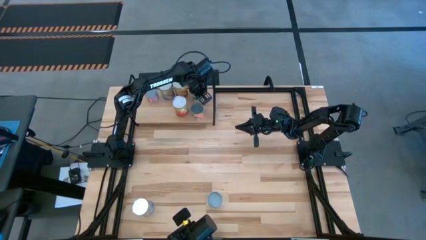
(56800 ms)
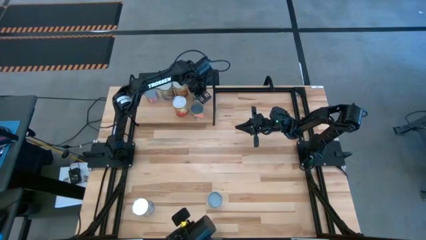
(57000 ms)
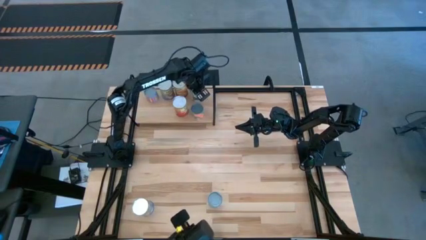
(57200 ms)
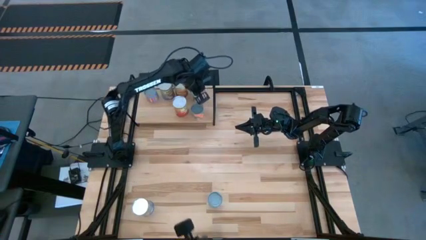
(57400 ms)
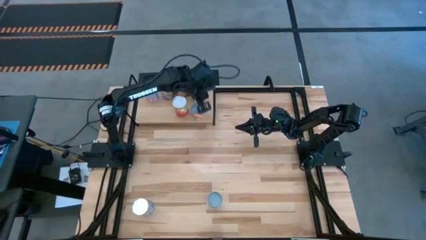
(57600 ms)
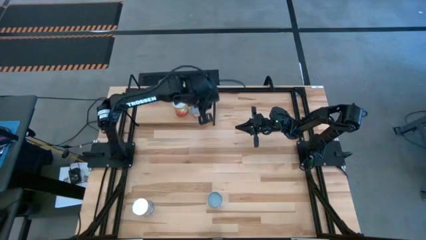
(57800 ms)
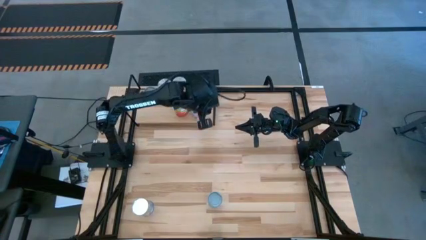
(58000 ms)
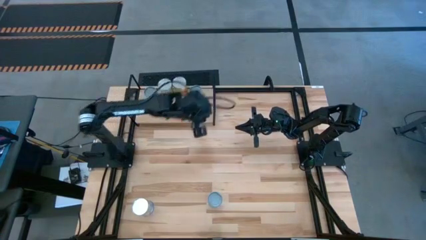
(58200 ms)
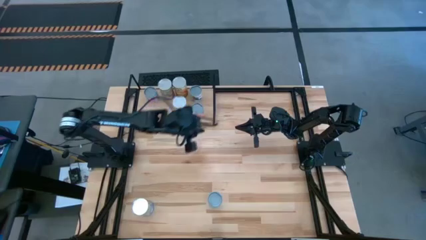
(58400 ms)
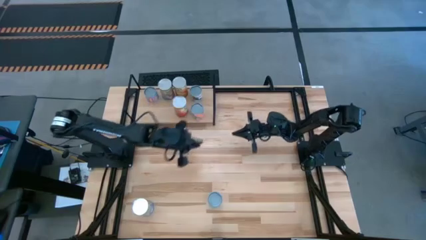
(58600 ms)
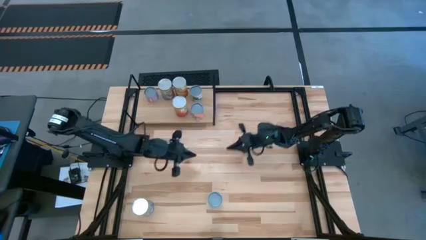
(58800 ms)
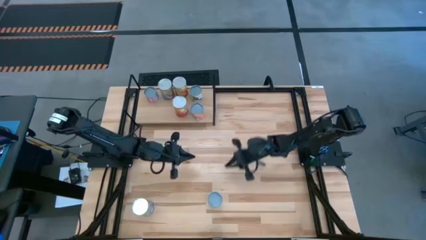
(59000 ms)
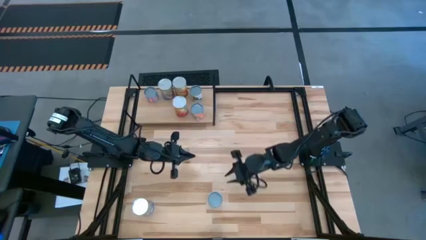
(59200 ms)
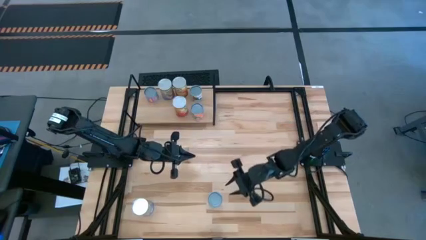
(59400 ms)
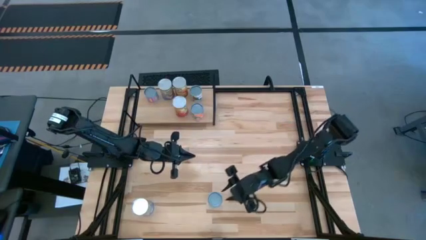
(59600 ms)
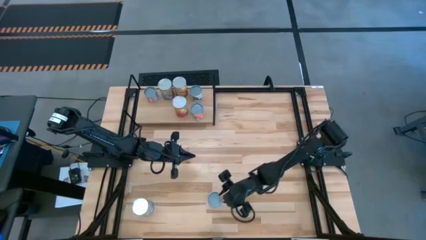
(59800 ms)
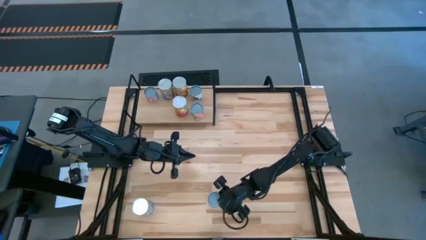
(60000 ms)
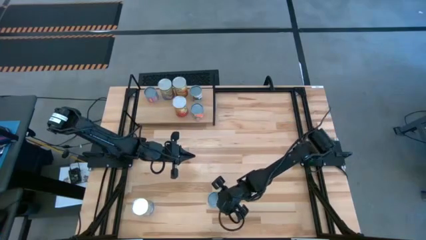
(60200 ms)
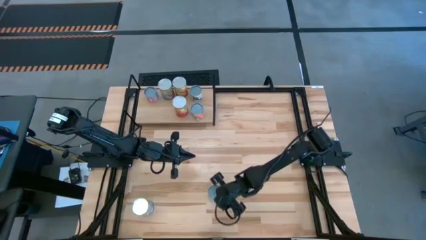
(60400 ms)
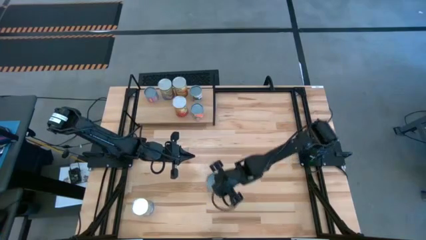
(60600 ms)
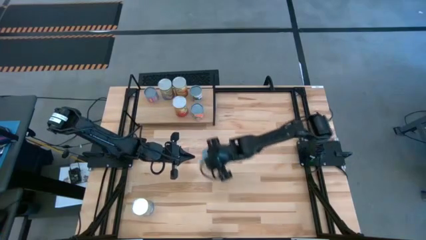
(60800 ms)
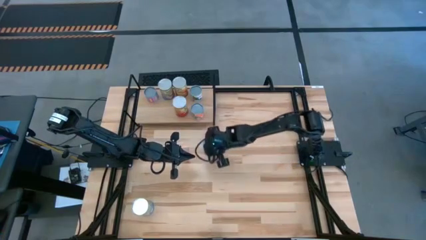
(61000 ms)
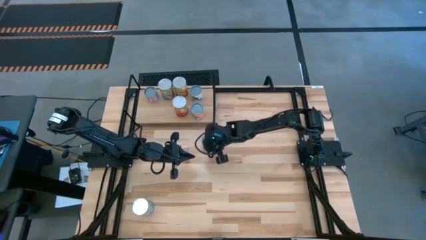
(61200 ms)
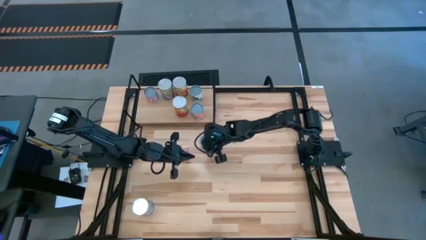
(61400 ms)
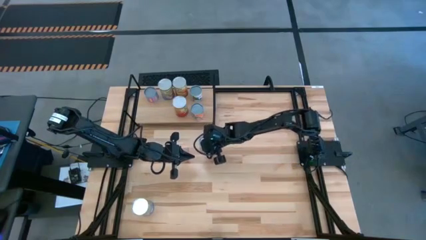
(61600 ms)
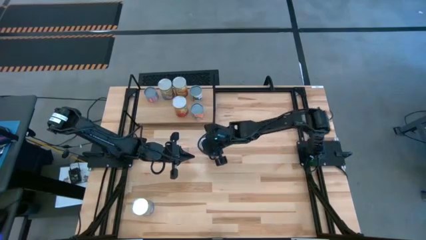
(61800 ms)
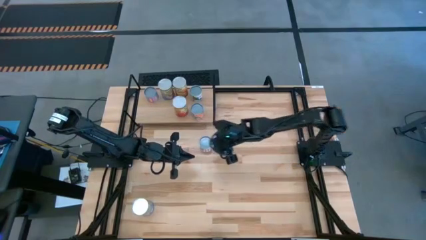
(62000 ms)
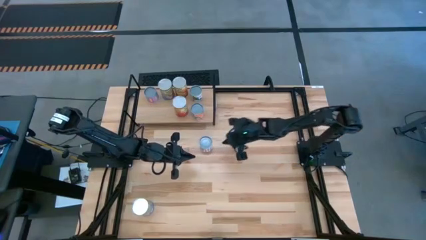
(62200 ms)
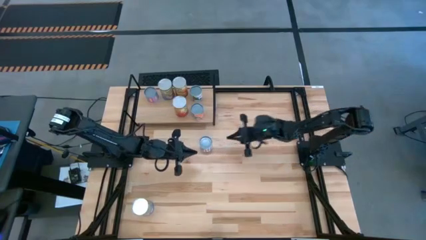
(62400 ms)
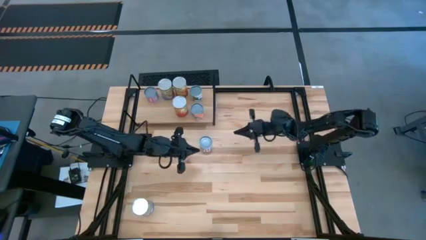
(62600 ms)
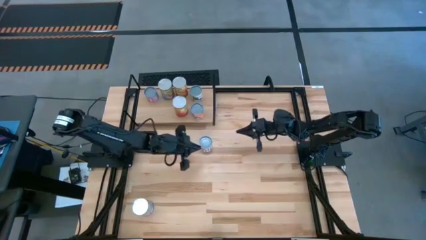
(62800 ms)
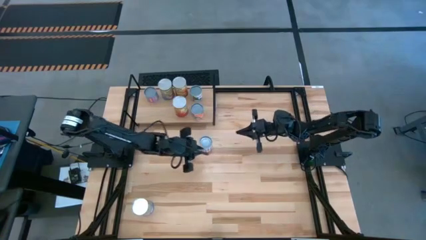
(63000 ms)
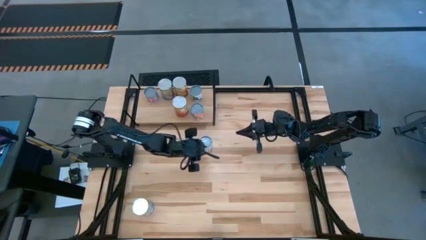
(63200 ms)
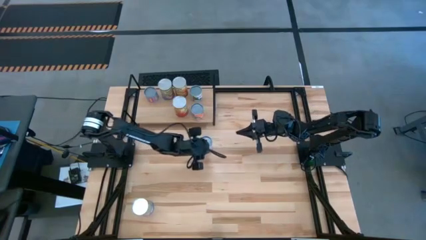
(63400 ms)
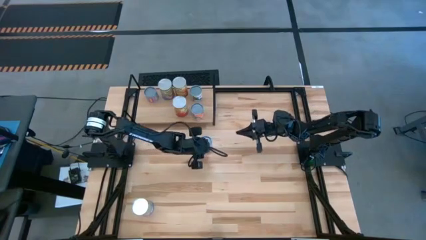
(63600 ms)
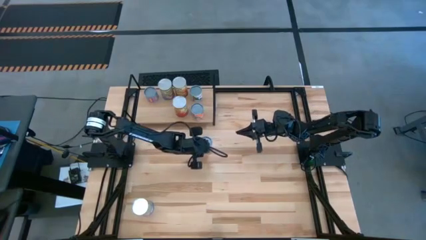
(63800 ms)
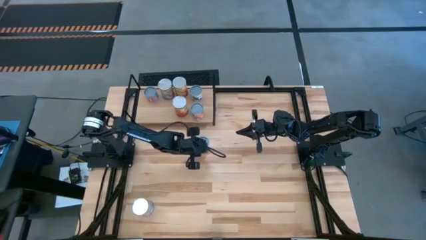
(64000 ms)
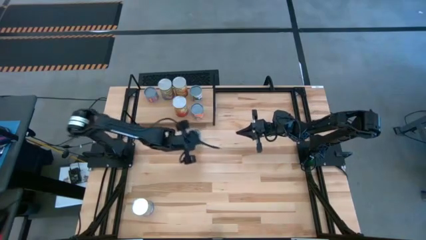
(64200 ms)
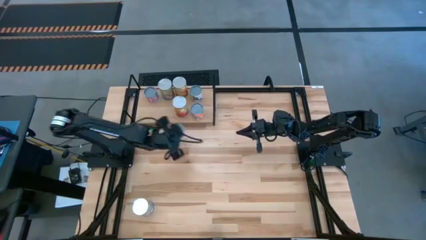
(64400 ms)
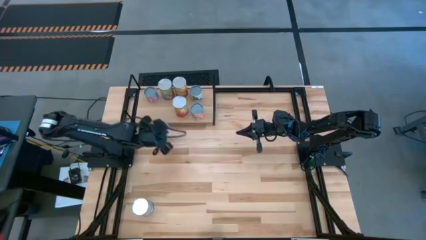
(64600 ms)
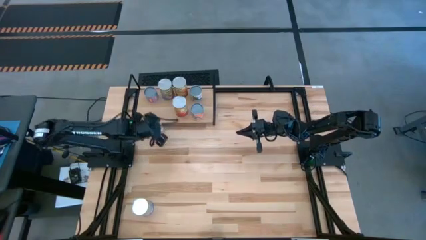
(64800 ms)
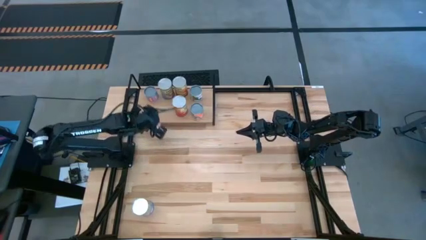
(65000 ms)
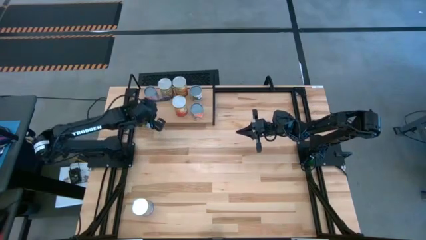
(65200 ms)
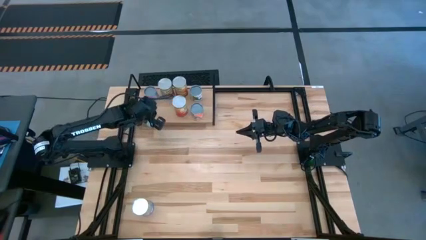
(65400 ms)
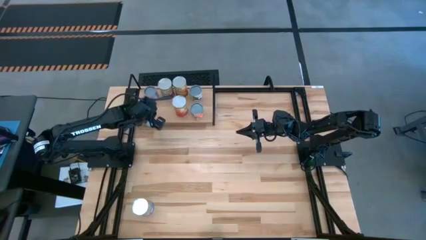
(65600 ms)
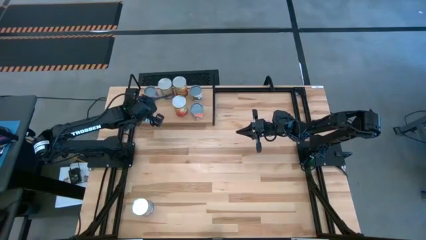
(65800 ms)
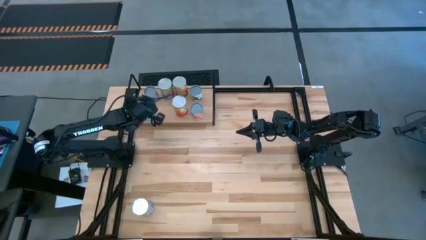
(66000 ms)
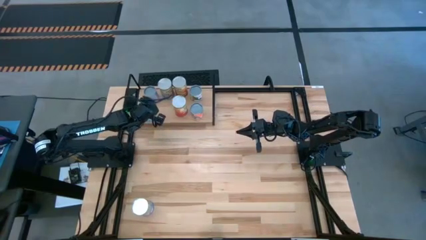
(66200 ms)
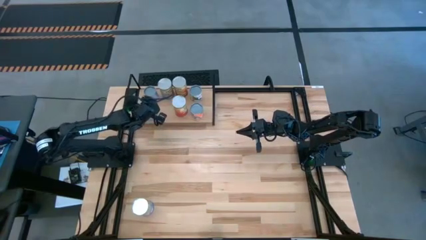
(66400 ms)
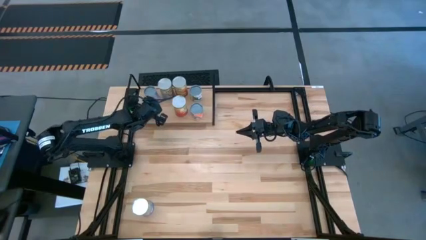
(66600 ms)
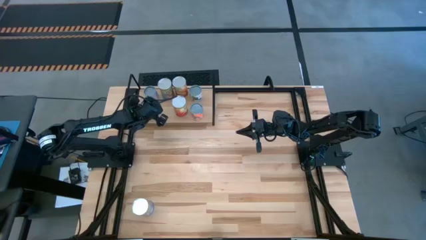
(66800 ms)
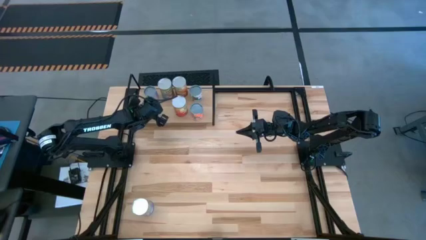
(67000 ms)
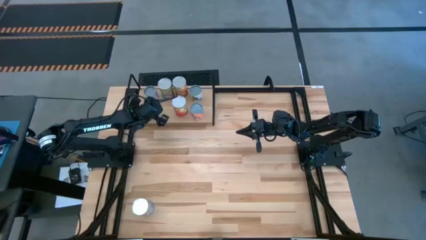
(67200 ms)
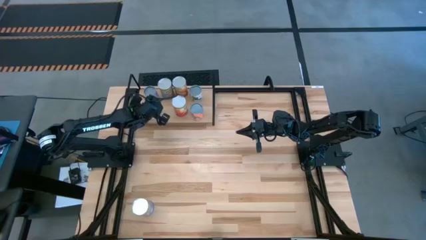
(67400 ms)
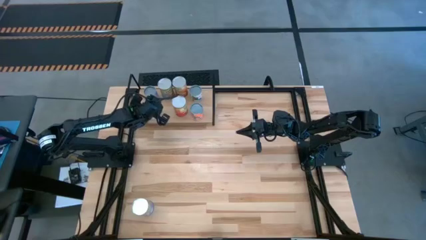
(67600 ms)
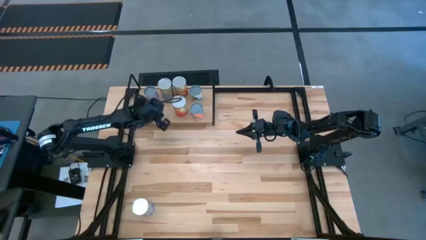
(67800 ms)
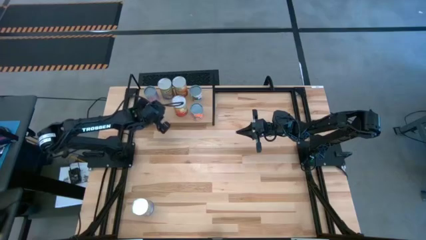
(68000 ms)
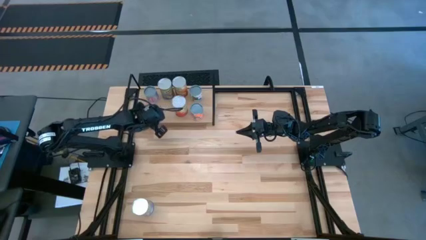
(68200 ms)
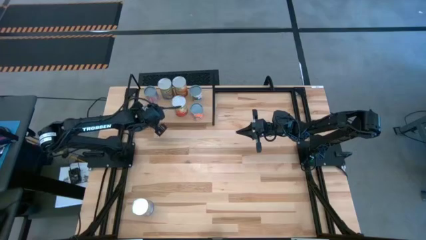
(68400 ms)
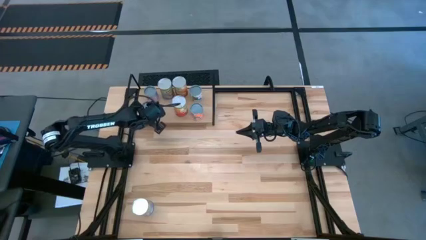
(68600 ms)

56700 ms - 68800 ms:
Task: Pick and place cans onto a shelf
Put the canned carrots on the shelf

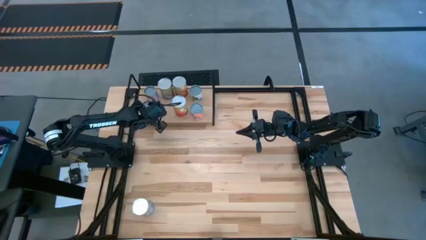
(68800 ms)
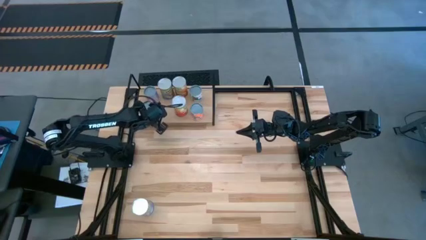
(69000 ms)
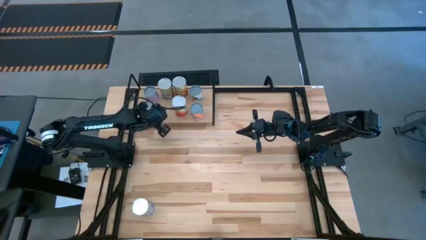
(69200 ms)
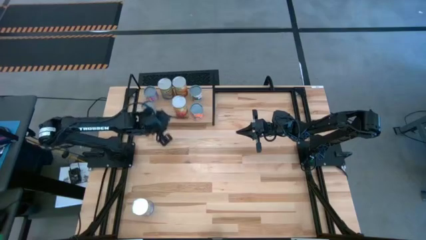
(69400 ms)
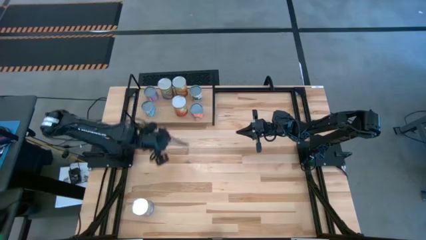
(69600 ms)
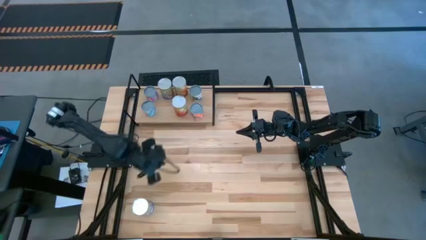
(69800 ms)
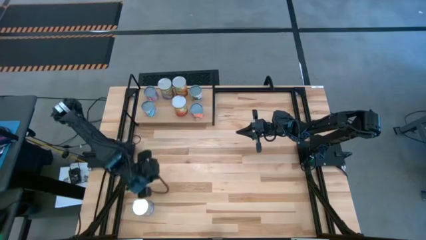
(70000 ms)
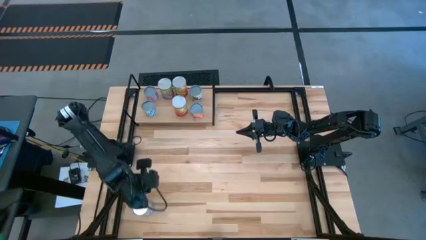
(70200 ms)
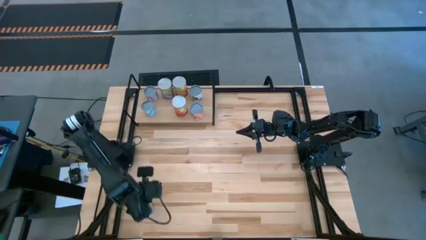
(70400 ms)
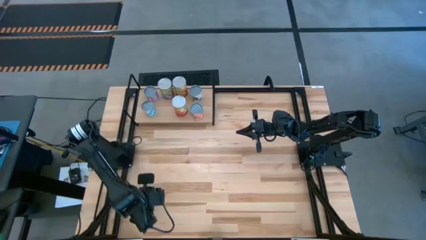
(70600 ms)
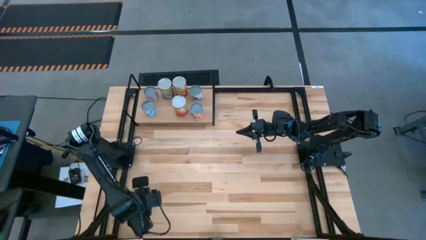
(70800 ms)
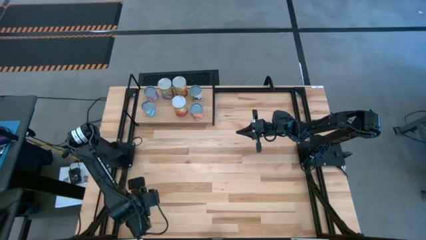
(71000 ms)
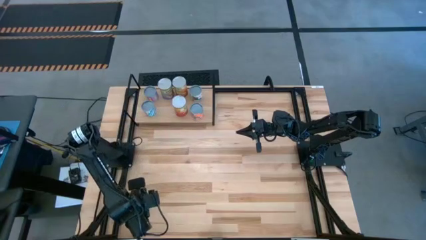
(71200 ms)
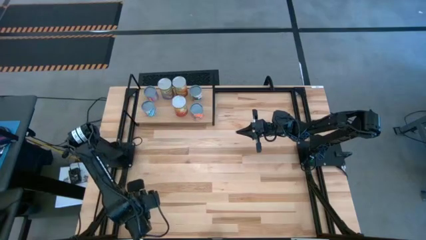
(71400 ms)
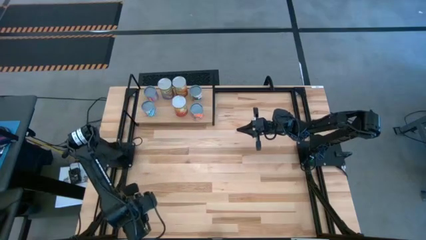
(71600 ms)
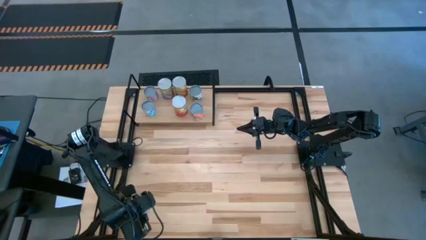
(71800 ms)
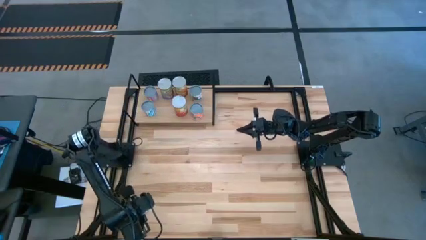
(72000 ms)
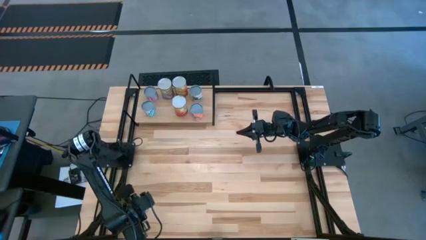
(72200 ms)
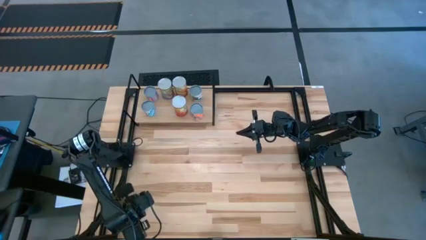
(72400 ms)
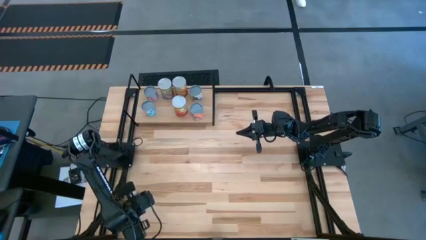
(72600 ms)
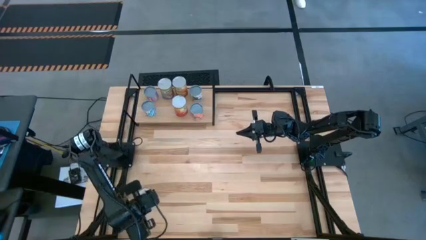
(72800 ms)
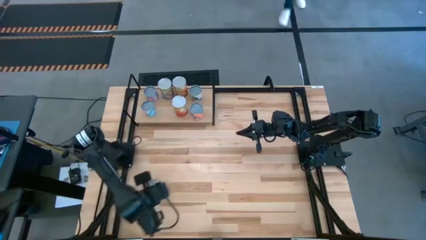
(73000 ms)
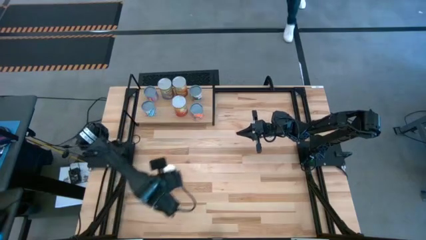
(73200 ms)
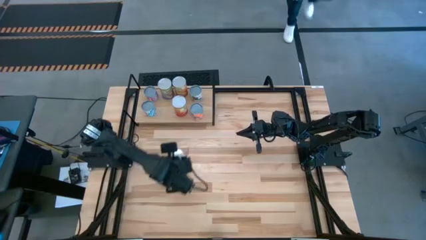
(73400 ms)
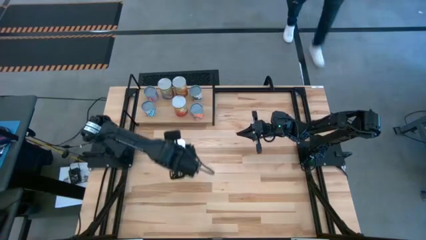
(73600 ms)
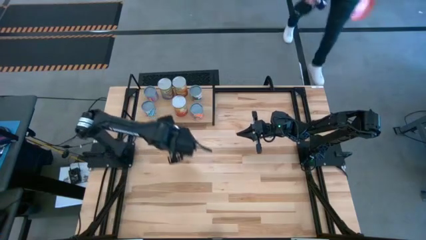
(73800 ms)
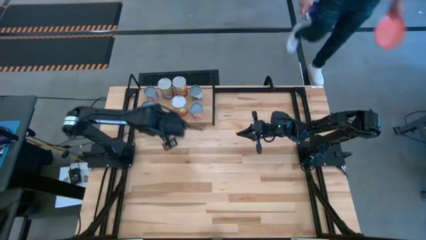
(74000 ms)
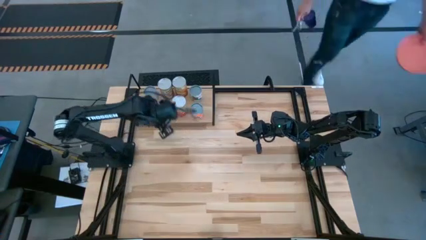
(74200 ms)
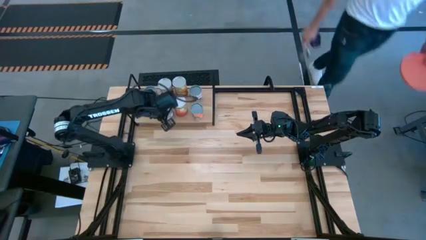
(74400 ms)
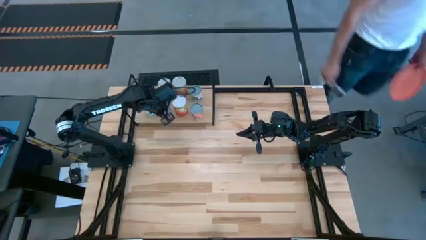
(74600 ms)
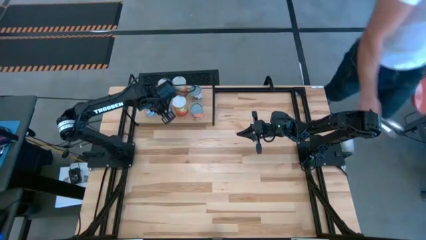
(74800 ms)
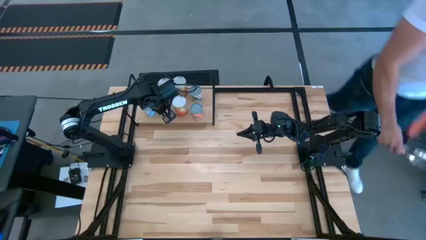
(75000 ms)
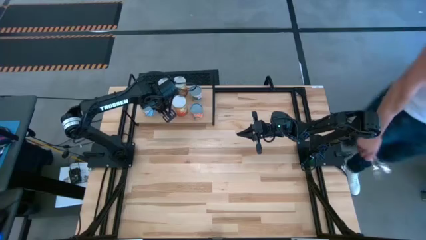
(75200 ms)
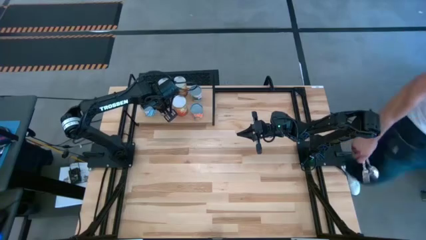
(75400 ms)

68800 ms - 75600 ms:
Put the canned peaches on the shelf aligned with the other canned peaches
